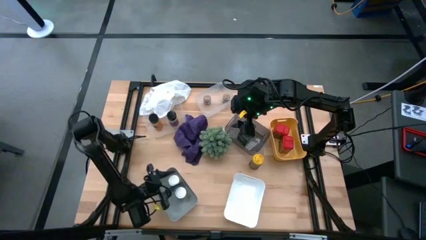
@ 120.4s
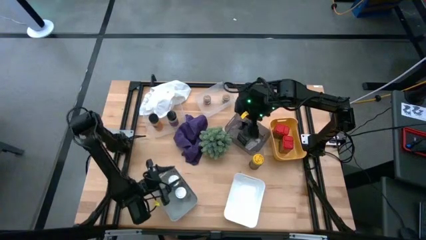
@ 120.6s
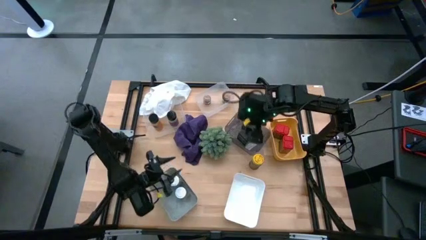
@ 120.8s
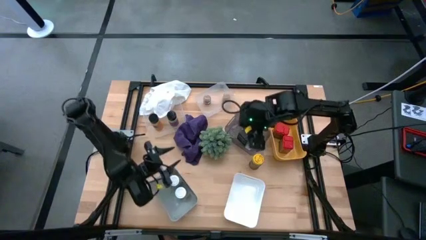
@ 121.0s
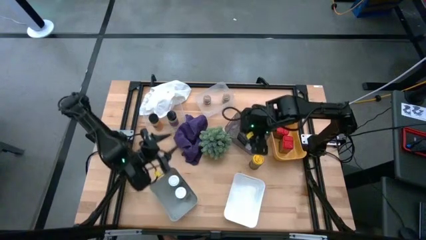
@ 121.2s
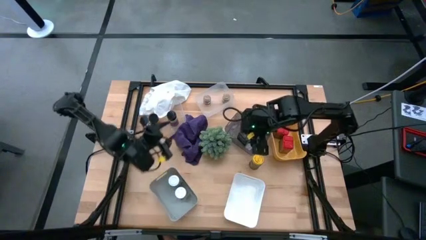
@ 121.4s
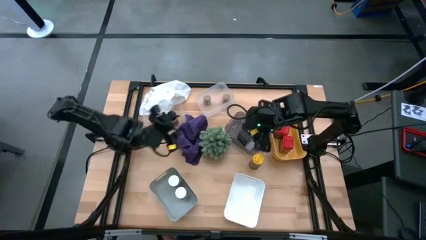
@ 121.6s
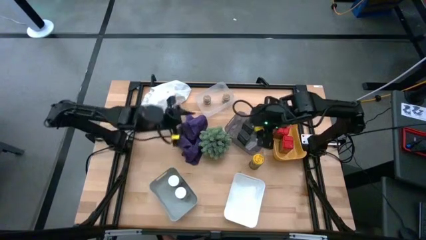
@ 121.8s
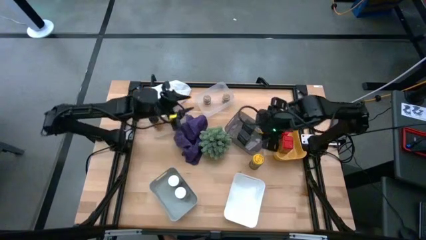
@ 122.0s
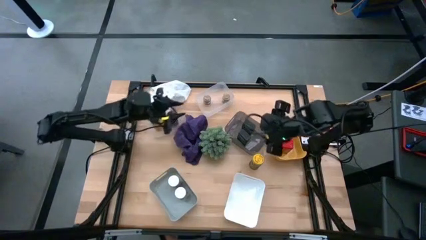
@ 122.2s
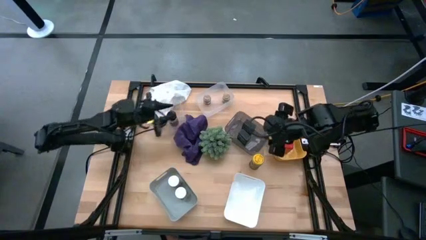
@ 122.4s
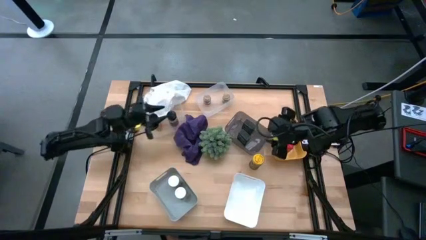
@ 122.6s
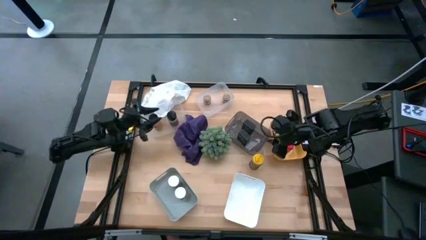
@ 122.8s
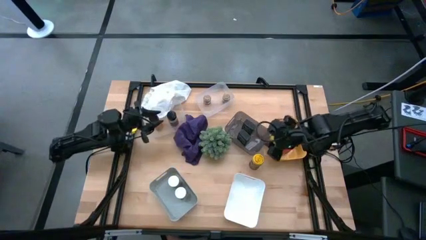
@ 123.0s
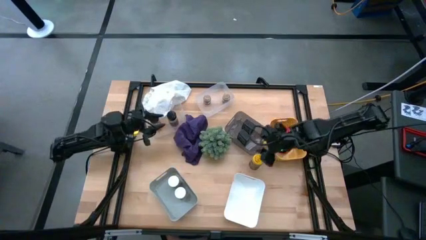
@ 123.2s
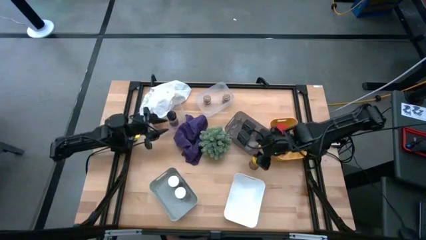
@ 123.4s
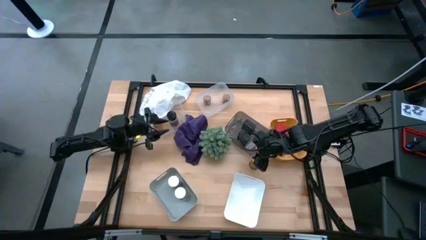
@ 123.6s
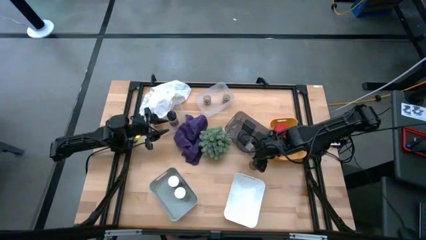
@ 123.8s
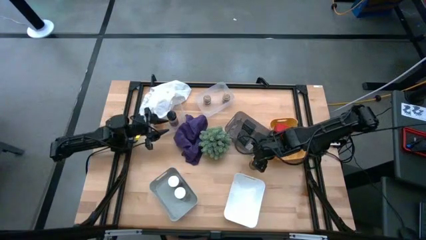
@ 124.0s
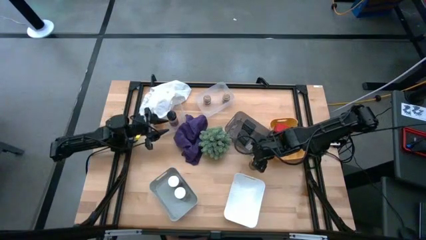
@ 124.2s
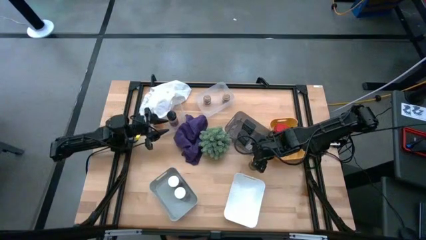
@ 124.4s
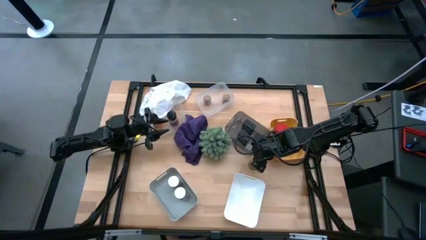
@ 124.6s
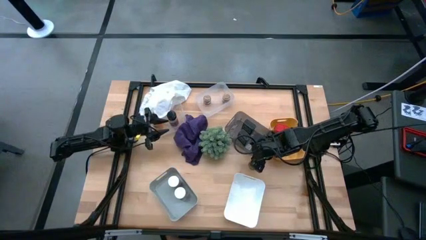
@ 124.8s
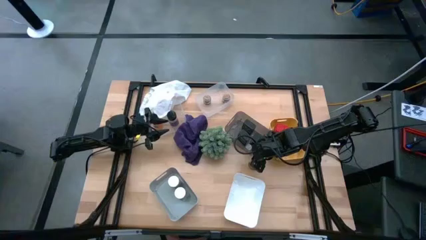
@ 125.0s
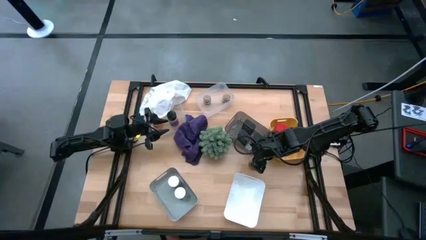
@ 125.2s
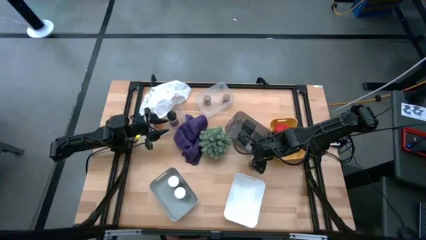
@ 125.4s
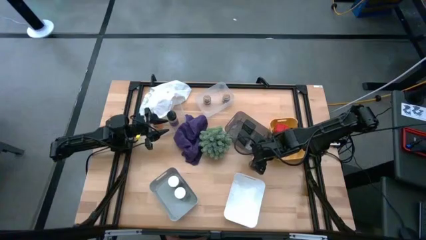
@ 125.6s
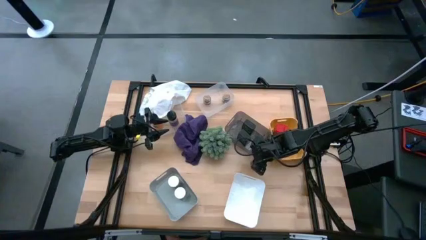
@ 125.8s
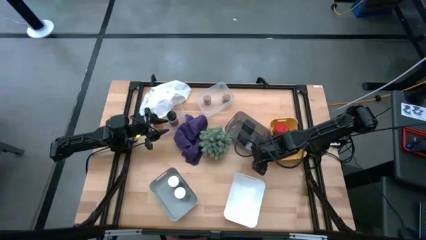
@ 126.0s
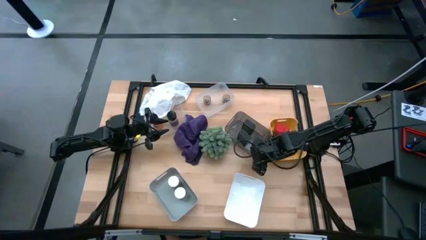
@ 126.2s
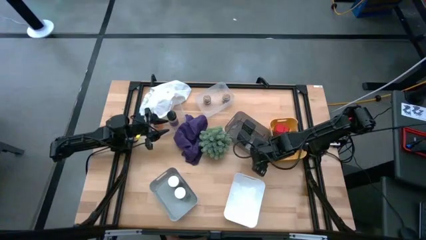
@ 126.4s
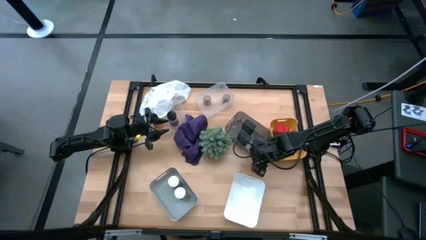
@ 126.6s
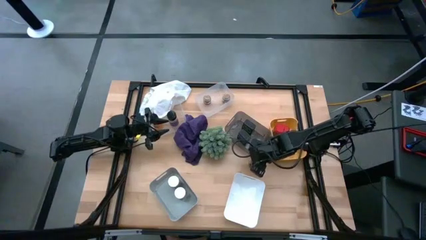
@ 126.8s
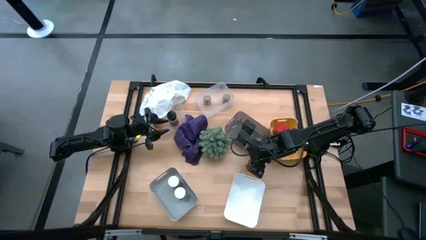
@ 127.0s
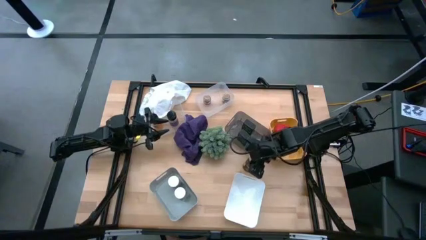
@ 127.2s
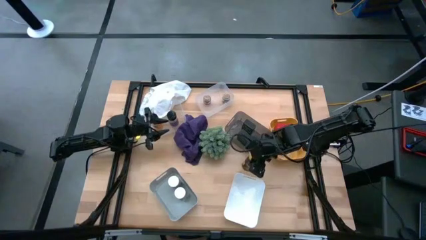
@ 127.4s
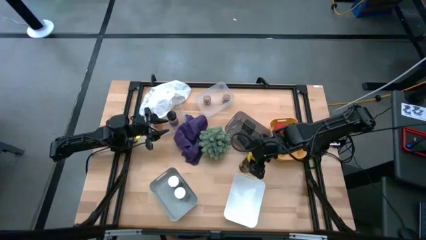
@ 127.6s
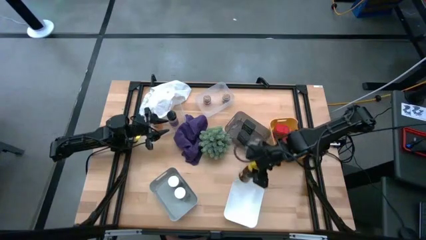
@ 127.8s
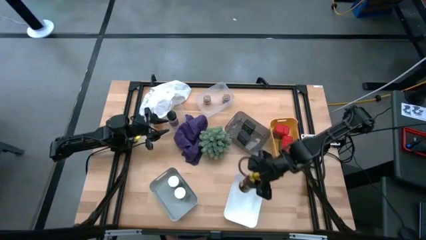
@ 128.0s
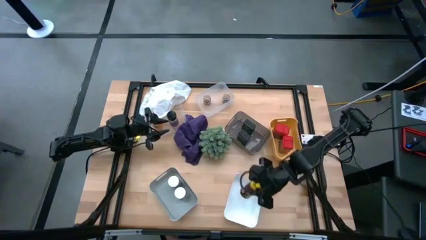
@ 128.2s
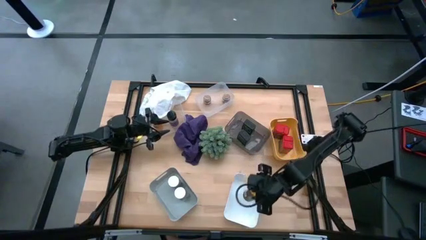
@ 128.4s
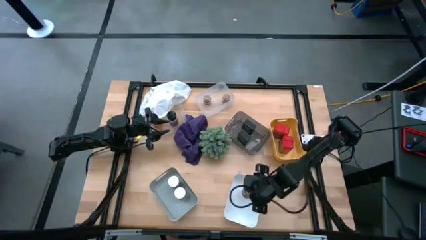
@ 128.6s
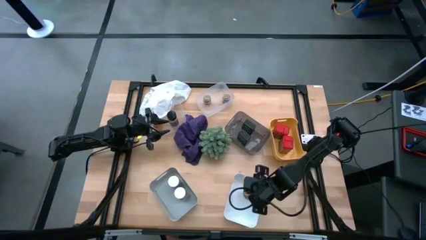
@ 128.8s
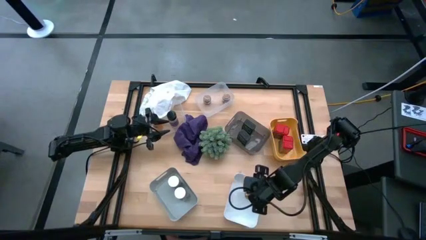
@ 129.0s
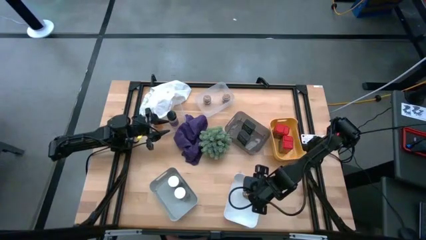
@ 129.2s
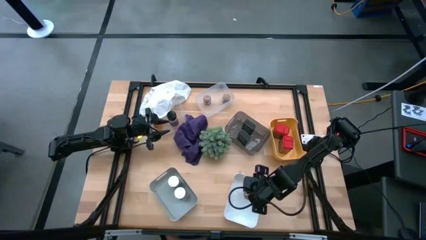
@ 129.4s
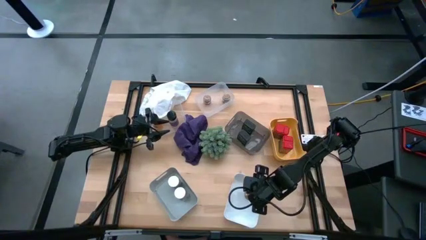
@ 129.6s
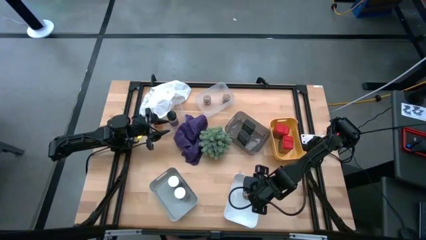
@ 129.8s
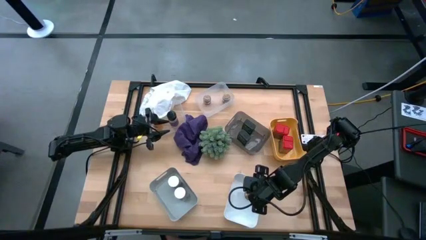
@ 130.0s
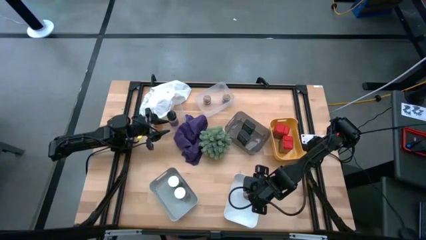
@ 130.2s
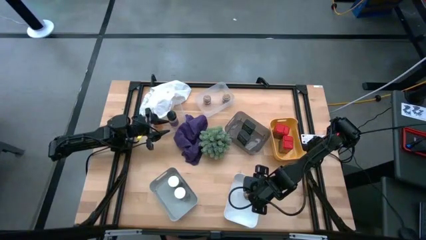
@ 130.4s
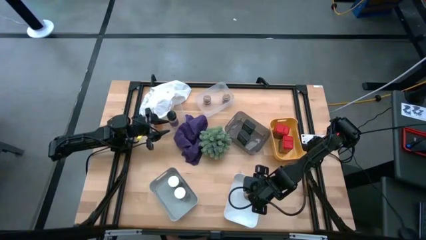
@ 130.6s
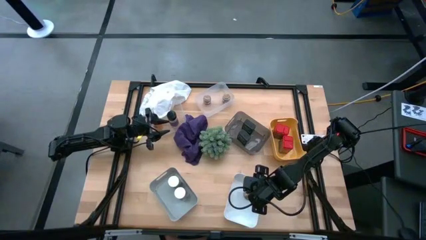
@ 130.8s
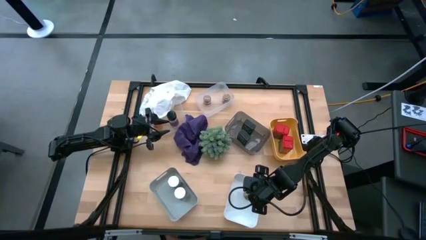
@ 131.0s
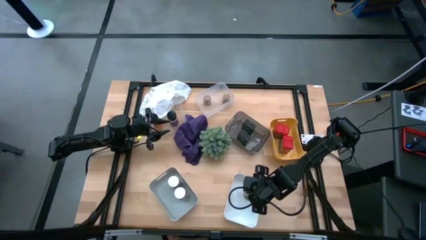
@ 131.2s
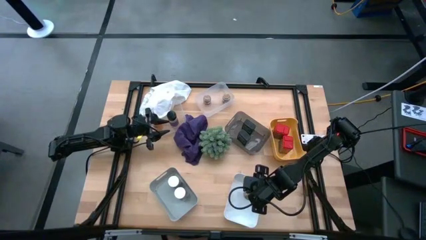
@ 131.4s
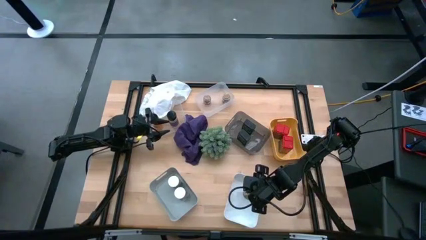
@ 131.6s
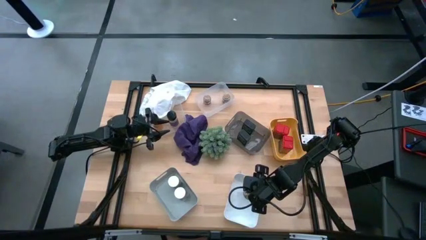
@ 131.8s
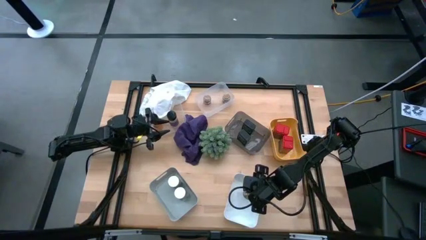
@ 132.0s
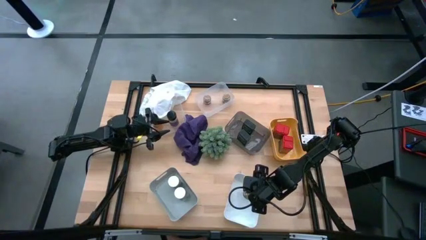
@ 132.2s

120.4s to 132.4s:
Task: Sort spices by type
Put the yellow seasoning can into the white bin

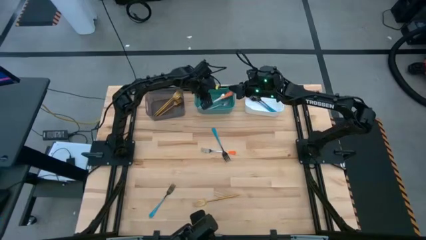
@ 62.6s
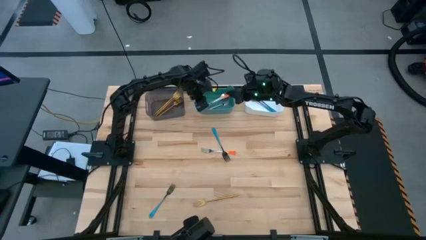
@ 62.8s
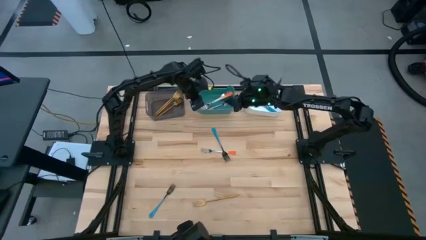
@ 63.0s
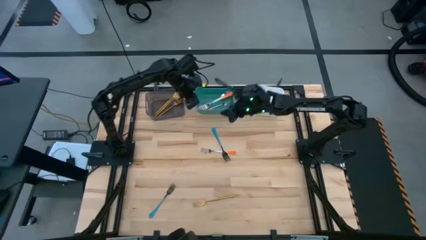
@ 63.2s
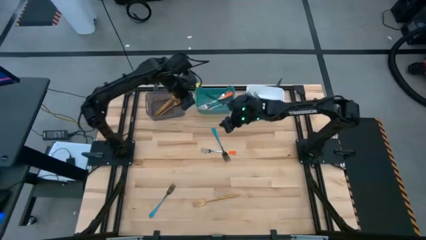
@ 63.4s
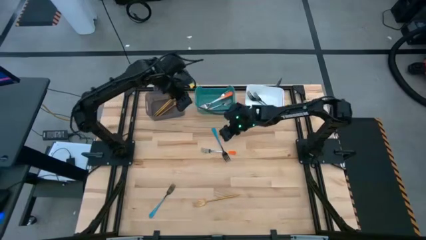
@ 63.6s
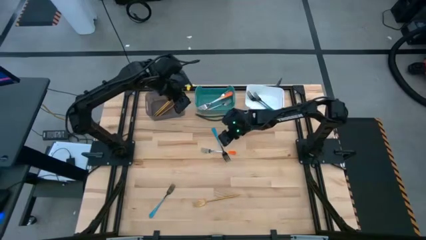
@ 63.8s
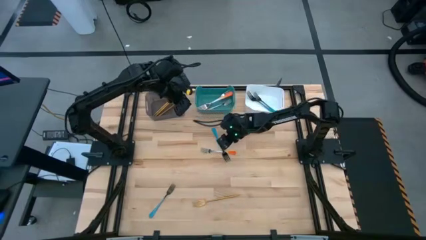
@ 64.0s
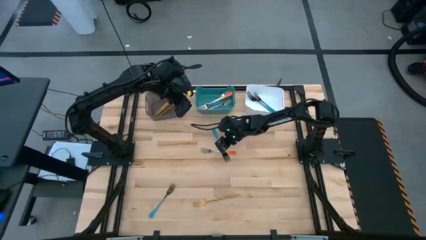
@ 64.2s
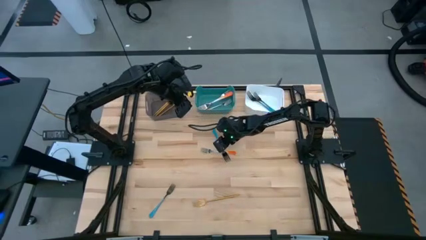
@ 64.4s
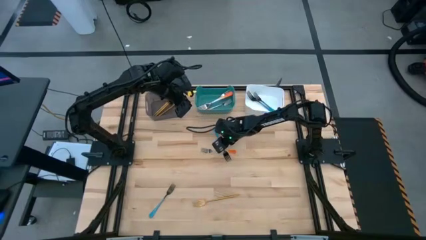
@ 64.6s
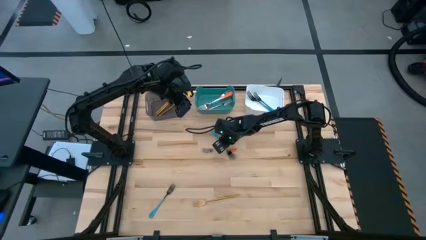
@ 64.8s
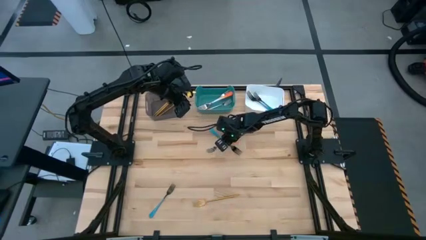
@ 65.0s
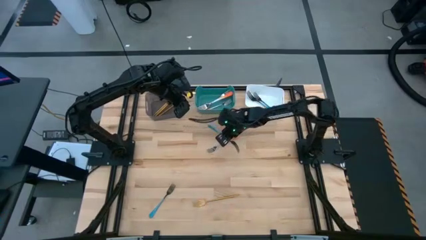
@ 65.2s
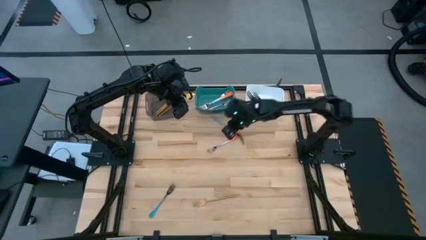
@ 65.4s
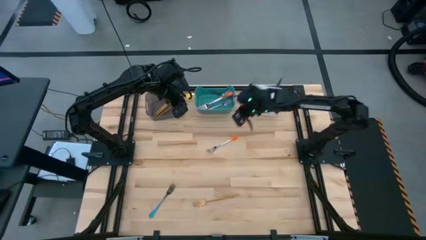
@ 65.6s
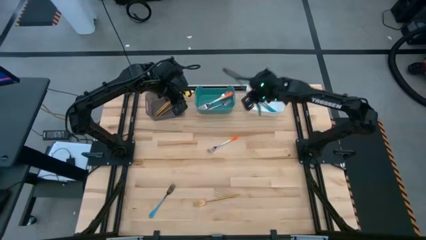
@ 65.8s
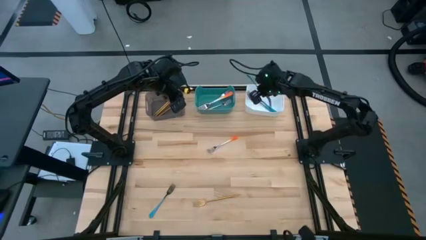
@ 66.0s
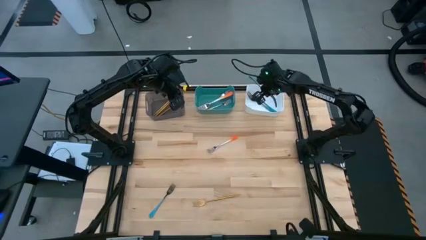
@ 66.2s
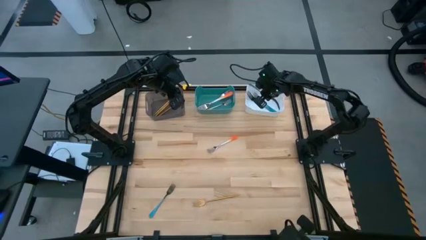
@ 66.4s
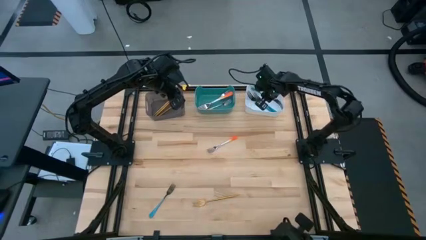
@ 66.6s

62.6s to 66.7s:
Task: Sort silverware by color (type)
Put the blue fork into the white bin
